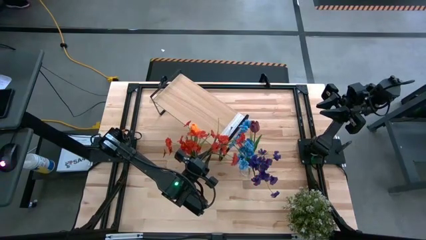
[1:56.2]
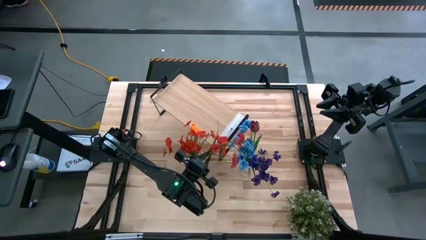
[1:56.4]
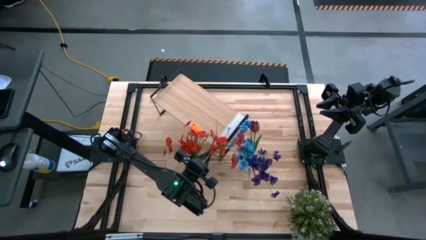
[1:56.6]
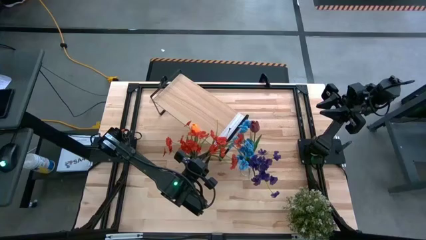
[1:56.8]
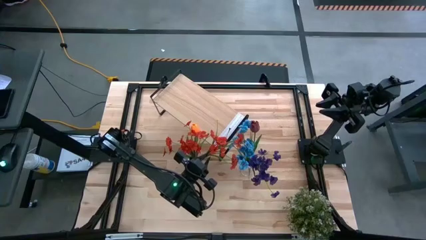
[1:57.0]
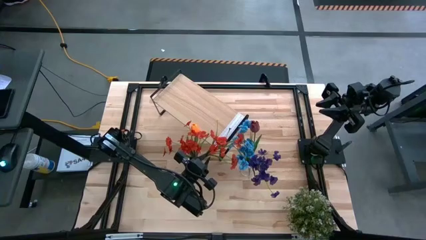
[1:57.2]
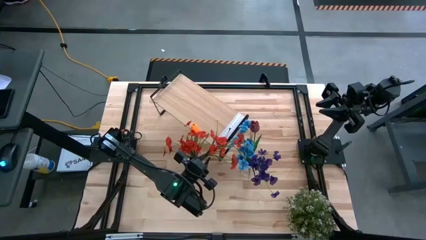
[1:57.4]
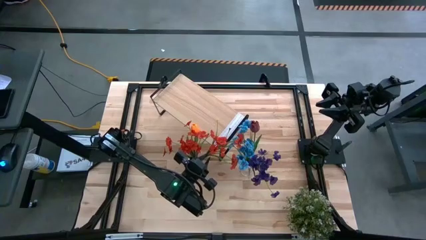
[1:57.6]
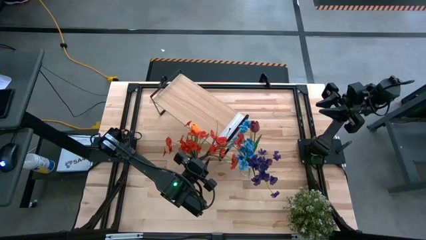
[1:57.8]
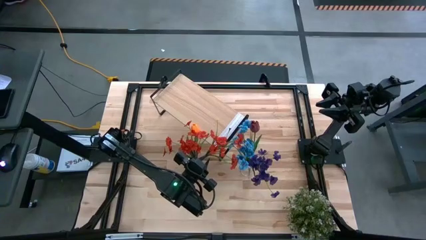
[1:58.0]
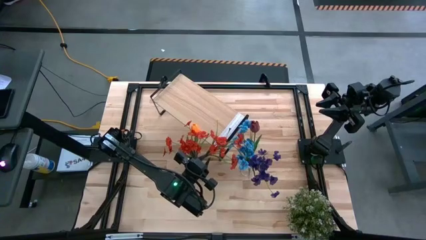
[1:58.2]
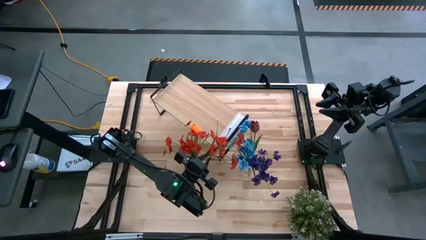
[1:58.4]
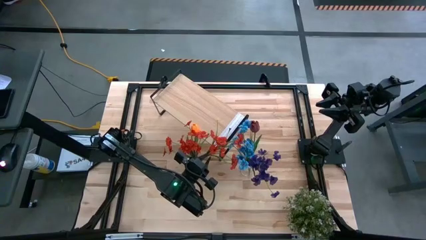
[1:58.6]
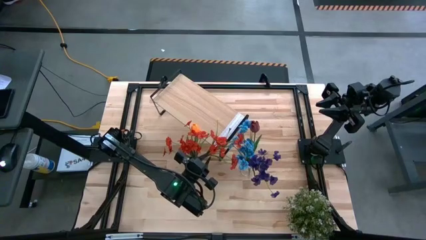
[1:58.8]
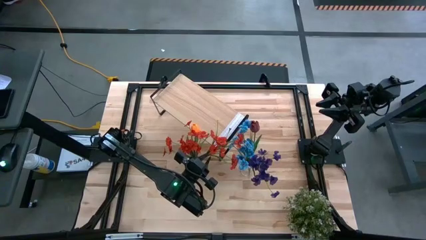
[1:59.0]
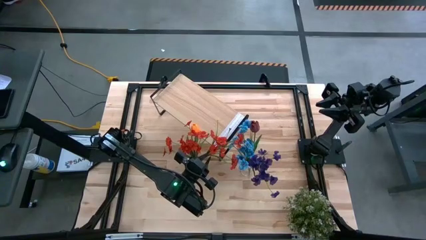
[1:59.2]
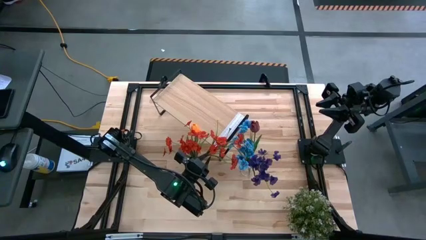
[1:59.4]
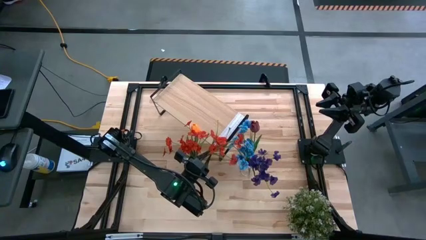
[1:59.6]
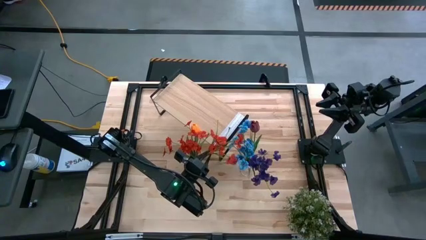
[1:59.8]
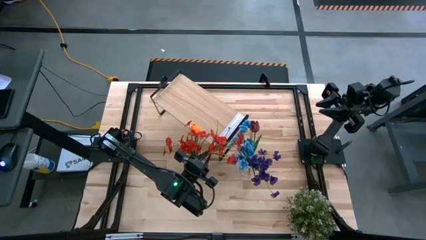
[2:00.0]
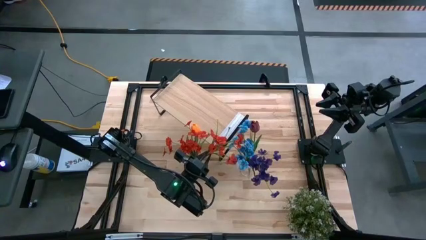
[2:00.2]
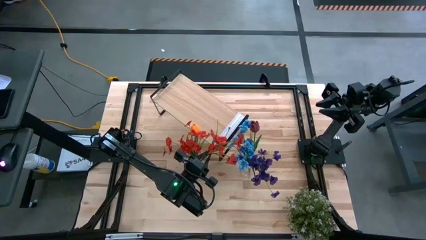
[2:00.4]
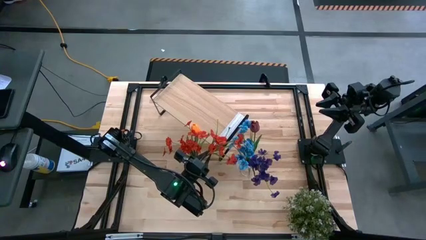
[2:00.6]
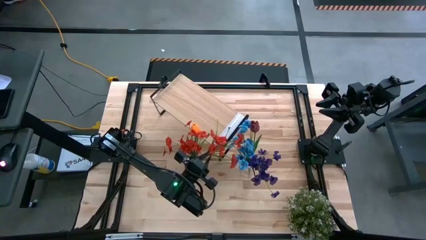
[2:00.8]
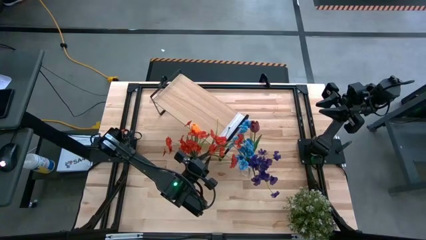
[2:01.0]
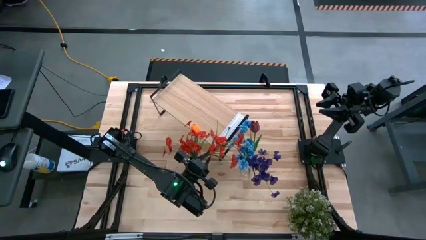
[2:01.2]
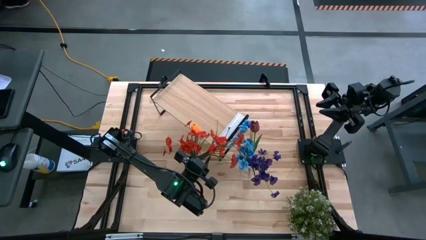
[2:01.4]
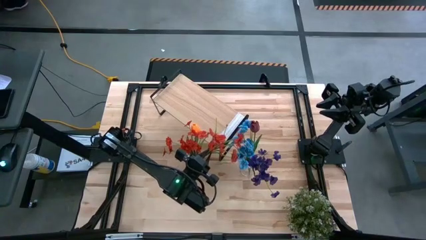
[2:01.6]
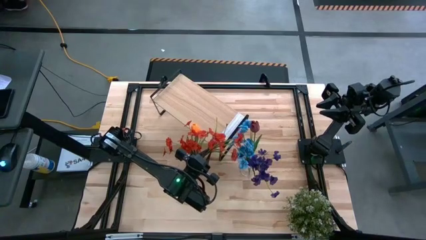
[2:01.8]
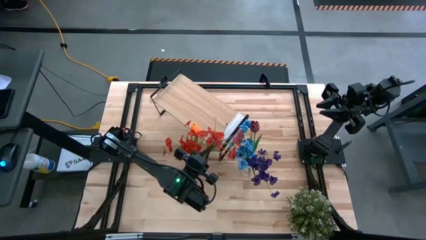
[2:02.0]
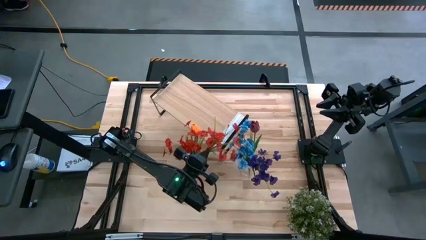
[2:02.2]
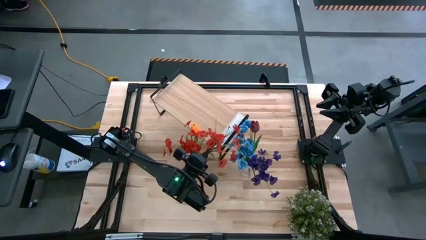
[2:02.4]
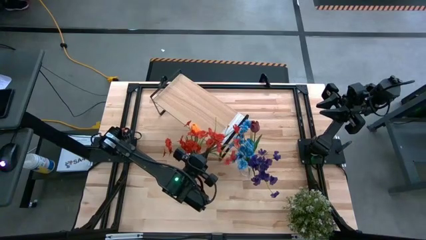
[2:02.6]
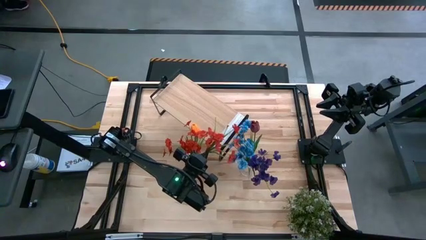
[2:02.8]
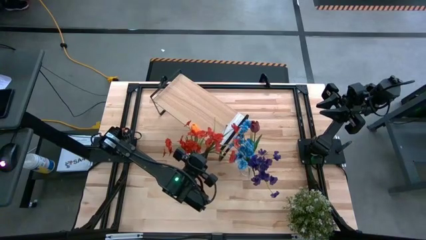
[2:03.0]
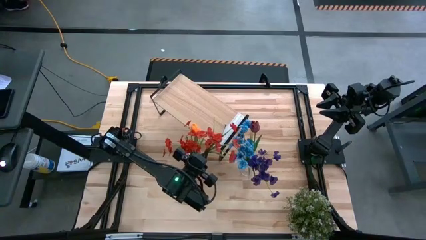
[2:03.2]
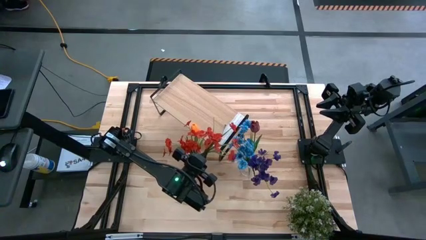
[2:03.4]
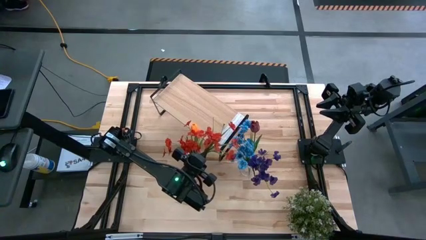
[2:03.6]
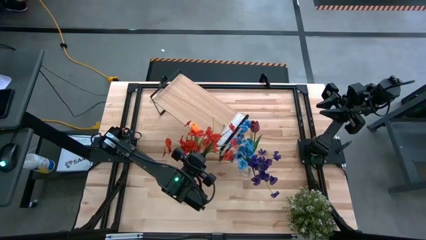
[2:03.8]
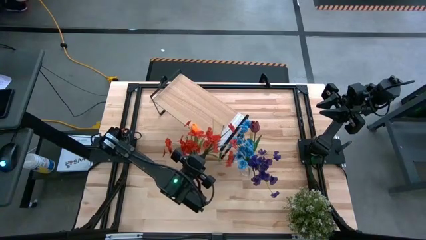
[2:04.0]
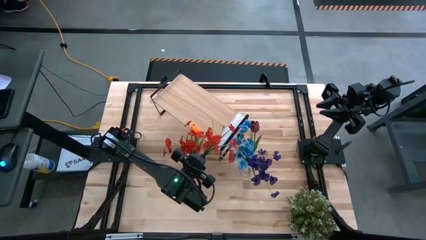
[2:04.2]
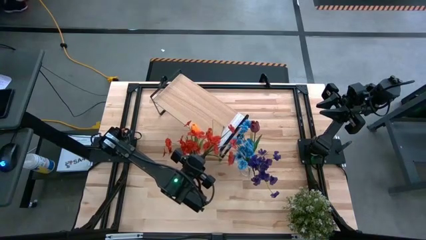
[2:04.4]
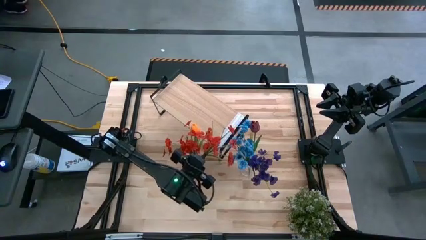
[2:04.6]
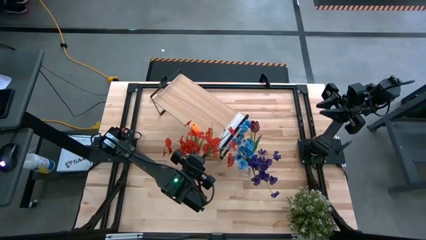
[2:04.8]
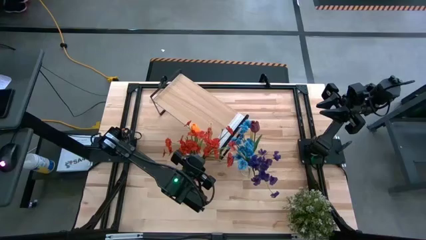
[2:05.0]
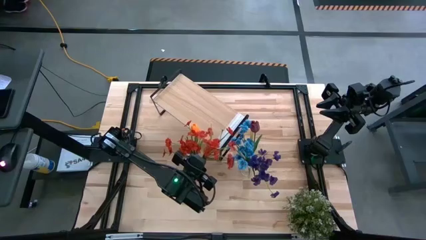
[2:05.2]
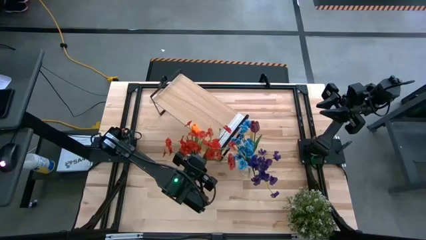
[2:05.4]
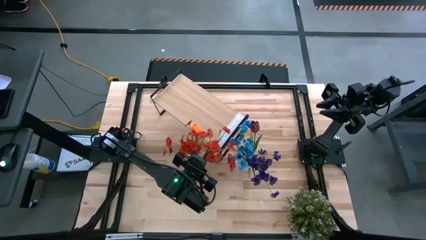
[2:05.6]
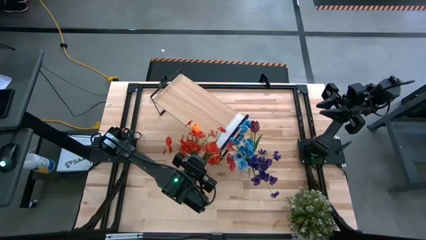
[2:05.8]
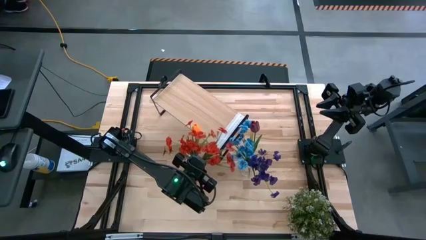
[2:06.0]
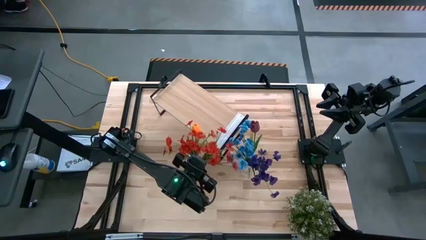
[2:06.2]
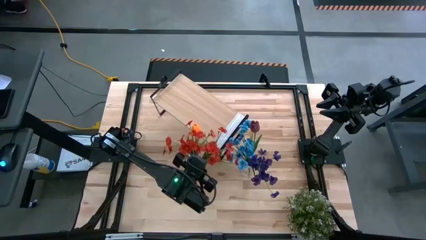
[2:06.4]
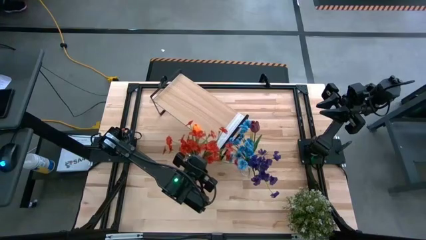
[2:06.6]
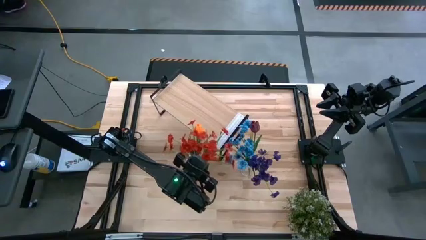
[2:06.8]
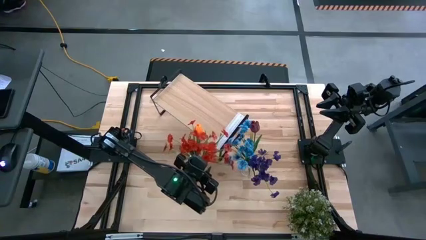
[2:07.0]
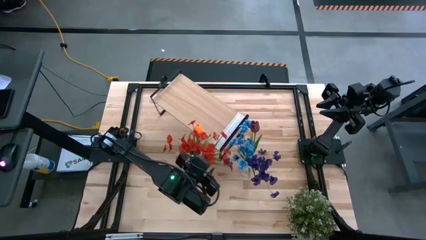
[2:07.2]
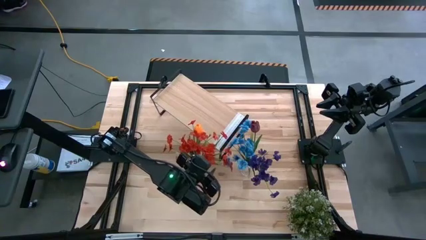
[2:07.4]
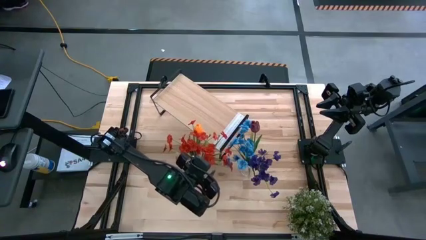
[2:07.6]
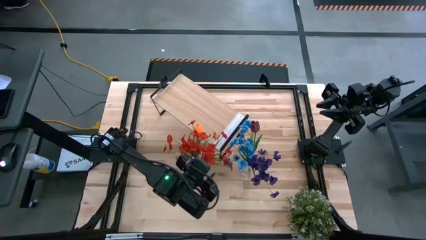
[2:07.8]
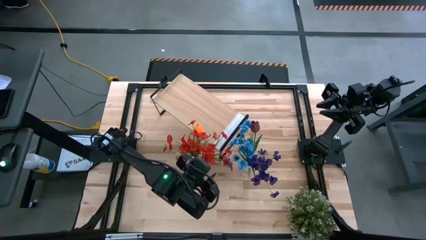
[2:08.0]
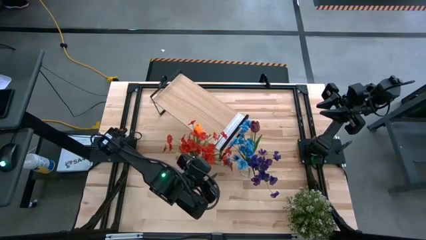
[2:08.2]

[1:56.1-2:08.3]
Task: Pick and place flowers into a vace then onto a shelf
Put the red flowers into the left transparent vase

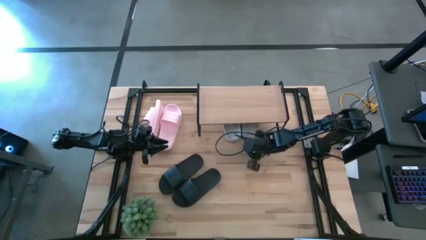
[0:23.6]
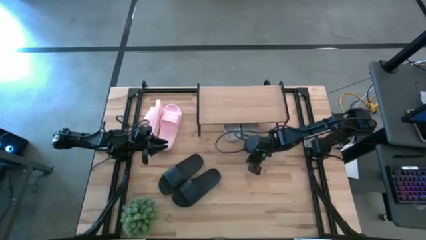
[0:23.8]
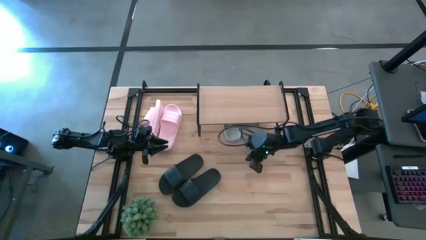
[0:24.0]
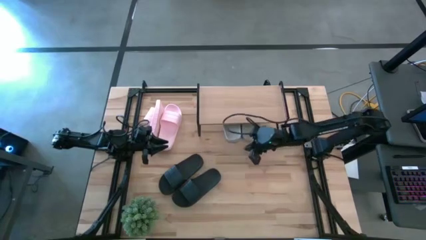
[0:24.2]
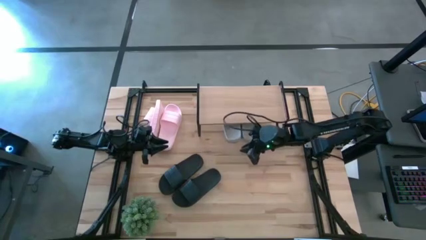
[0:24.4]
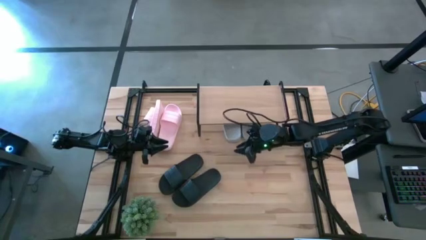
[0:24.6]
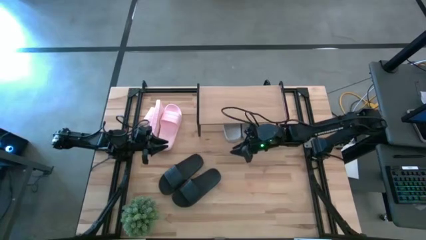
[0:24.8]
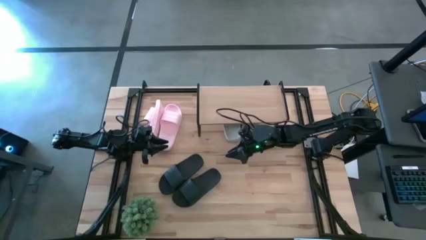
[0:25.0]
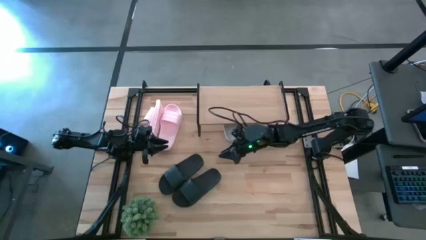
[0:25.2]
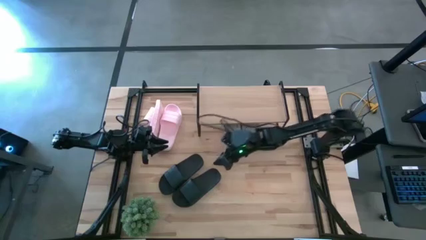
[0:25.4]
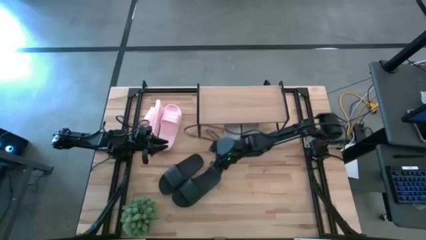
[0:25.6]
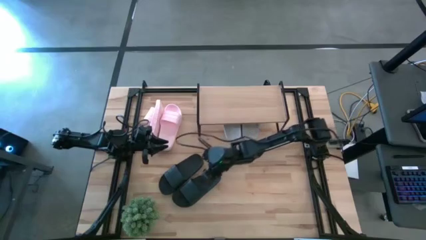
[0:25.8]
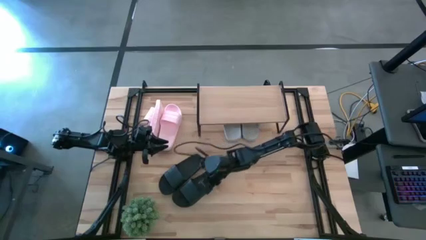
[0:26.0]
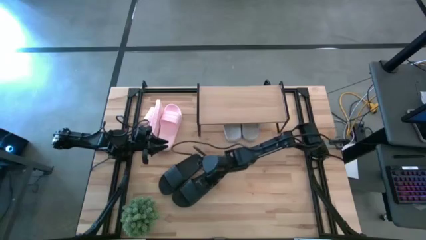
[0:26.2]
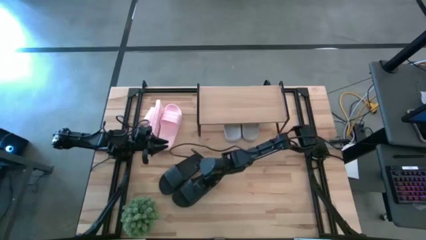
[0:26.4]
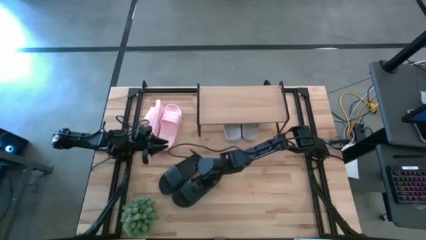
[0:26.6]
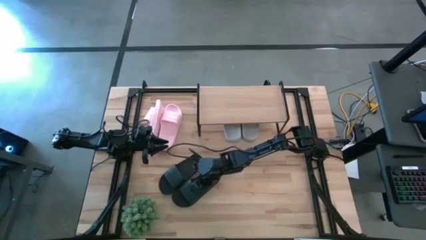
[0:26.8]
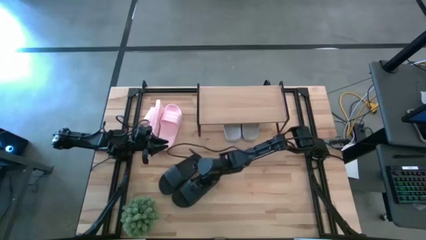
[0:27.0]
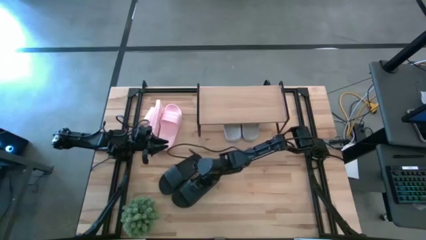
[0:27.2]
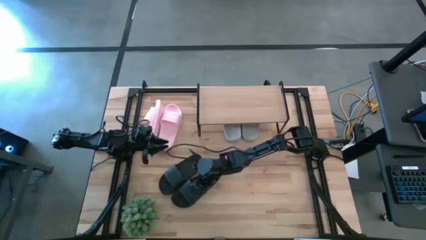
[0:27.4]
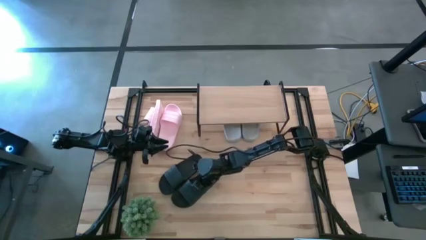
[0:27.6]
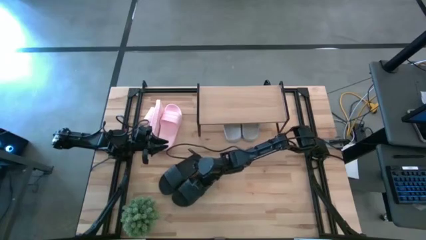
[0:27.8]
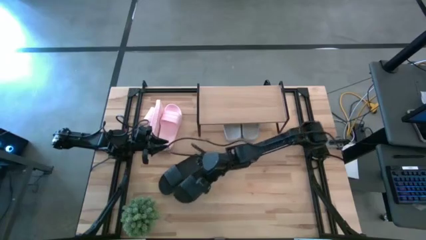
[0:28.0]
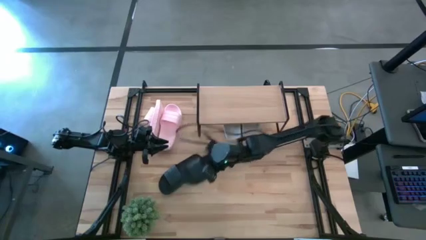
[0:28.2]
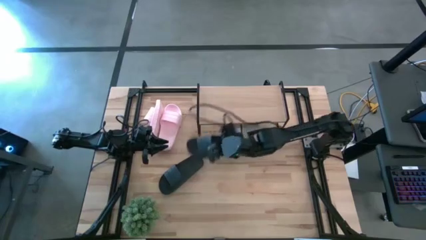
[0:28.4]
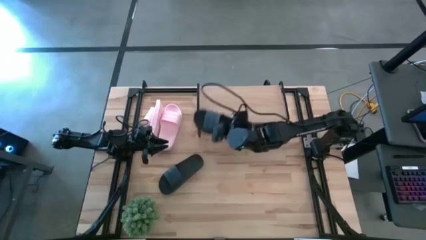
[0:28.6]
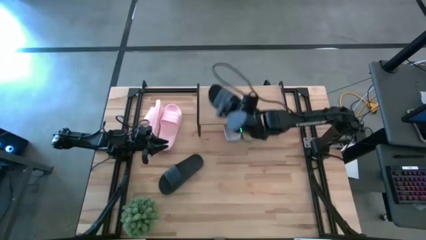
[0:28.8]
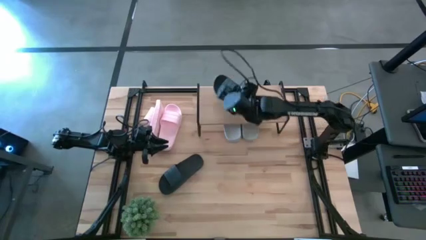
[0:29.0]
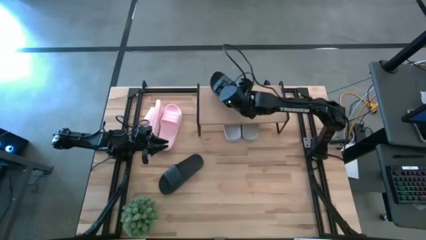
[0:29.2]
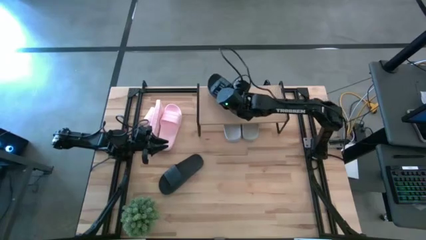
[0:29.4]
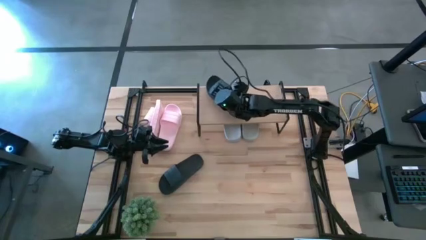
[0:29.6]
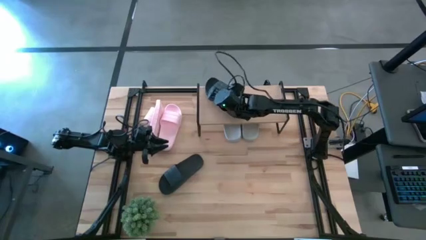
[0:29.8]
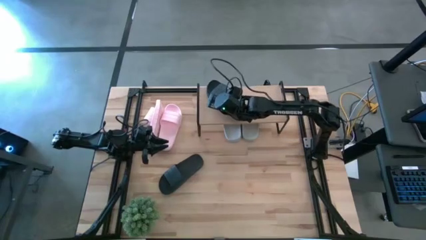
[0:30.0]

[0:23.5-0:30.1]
Task: Pick and place slides into the shelf
Put the right black slide on the shelf
